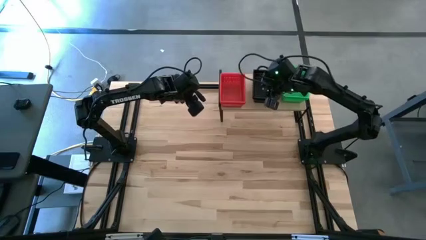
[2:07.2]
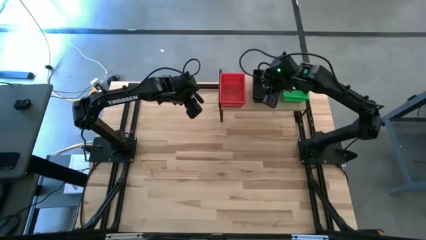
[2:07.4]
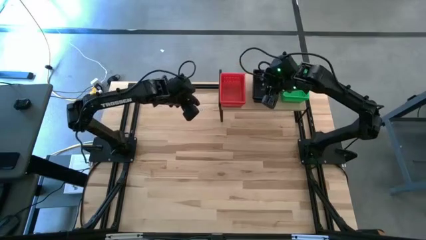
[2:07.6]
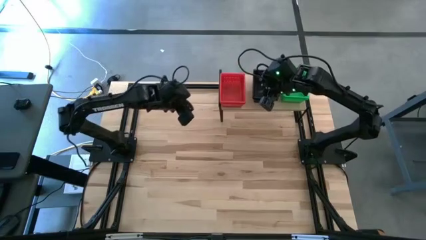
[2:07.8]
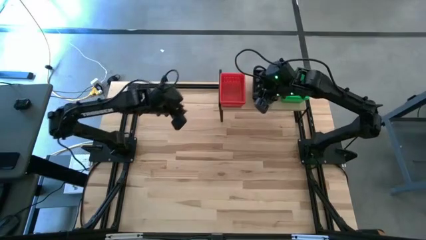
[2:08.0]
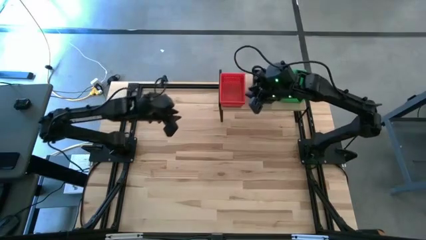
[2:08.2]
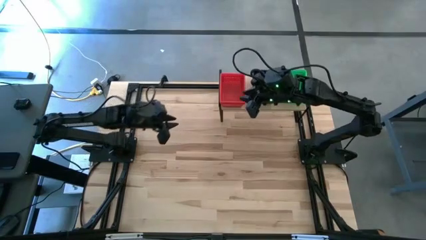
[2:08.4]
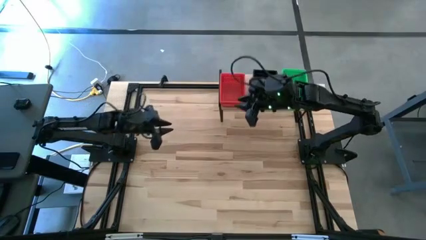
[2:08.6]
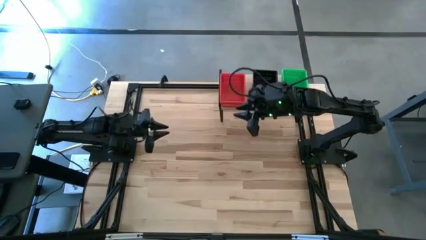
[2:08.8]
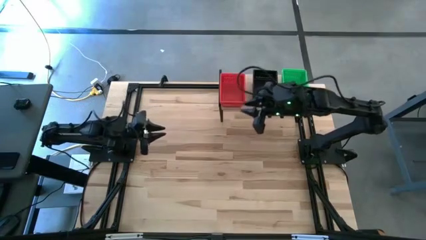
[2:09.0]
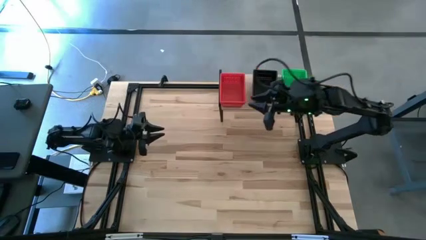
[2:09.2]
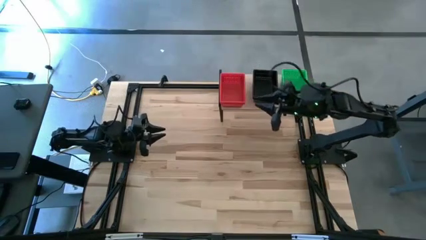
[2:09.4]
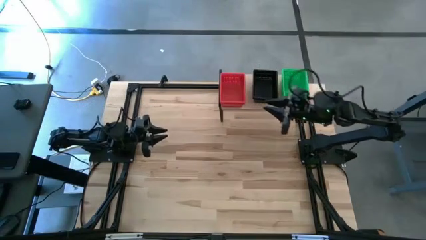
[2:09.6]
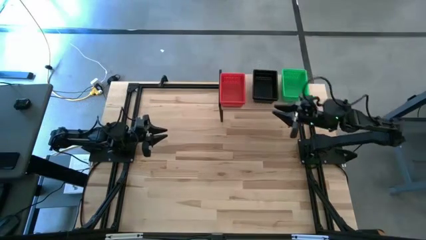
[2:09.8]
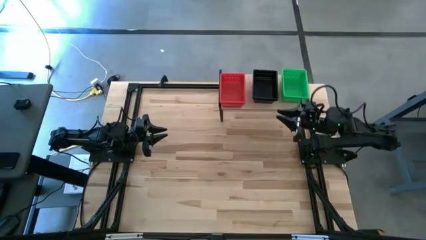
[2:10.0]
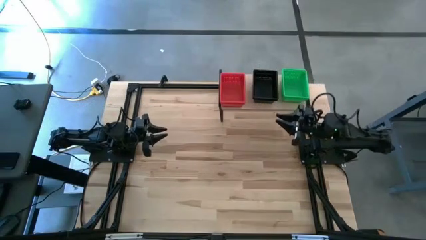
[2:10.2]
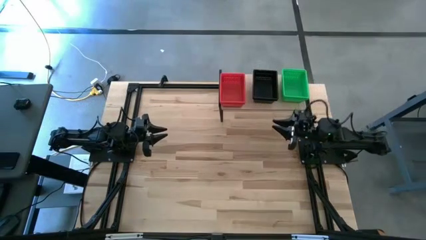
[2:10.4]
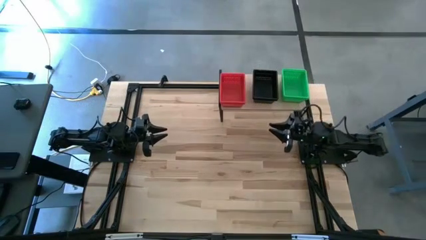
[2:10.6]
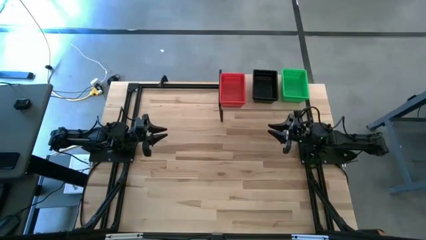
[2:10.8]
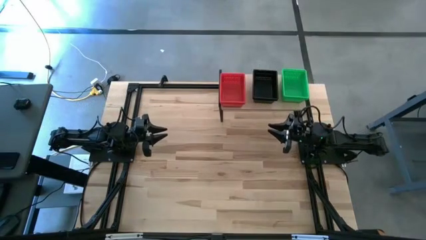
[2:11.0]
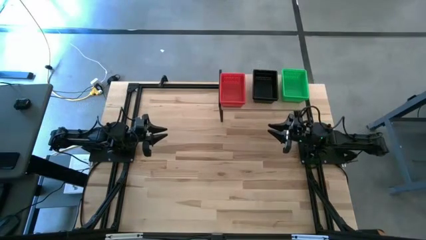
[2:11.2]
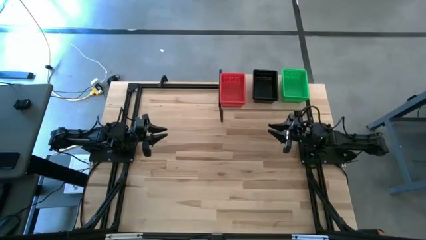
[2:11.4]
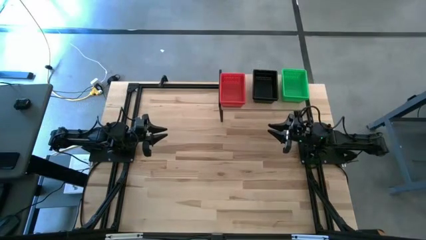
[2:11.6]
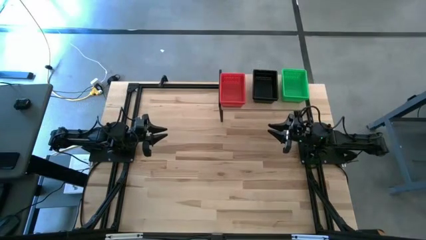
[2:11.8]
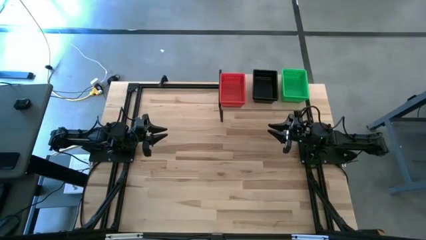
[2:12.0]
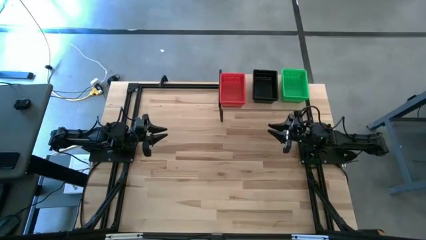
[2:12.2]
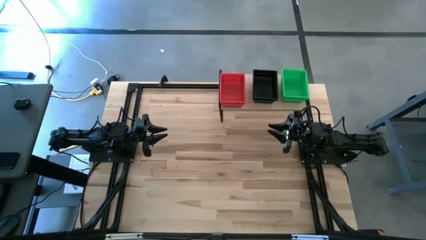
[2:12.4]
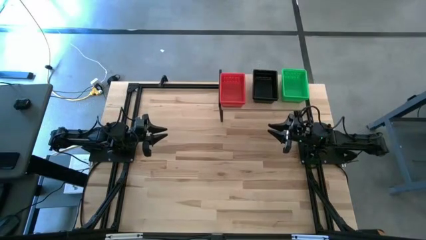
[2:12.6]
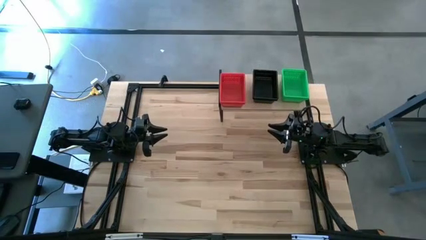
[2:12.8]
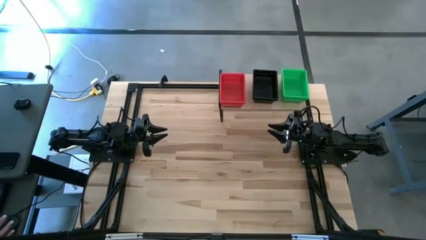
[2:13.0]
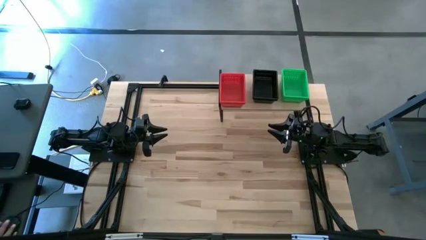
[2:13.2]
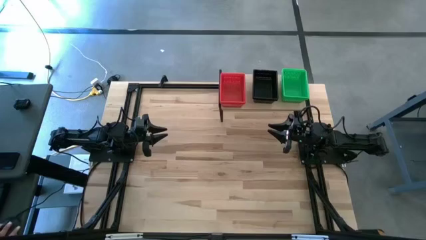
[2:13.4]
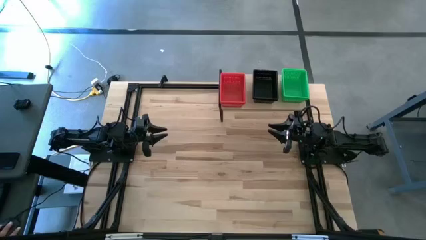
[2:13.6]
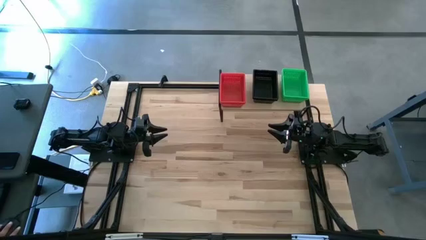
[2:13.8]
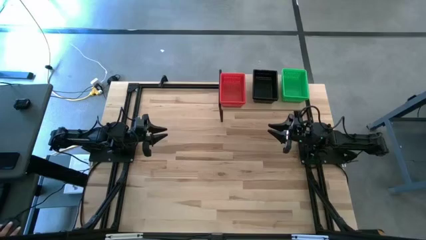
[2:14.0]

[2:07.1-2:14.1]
Task: Stack baskets on shelf by color
Return to Home Position

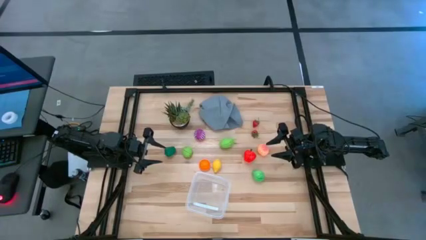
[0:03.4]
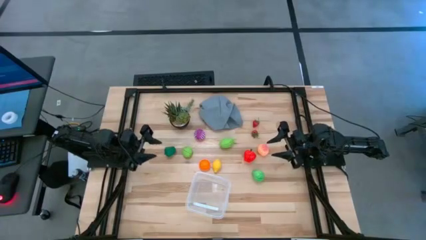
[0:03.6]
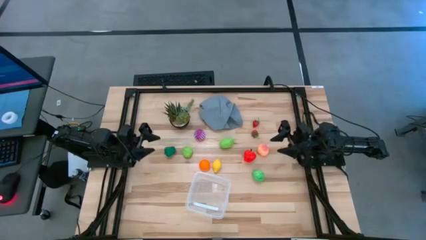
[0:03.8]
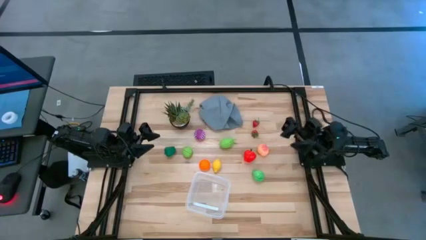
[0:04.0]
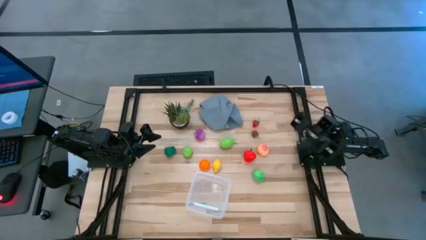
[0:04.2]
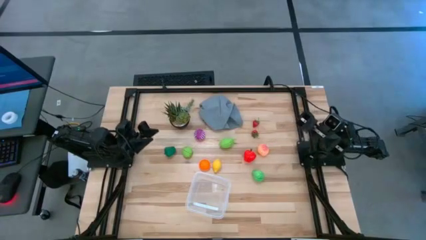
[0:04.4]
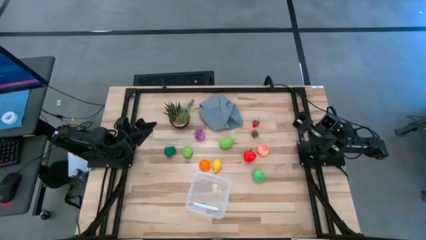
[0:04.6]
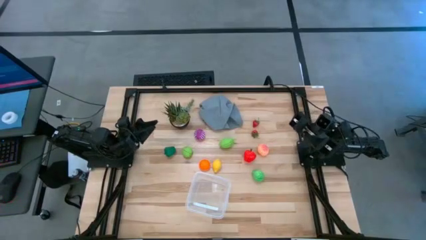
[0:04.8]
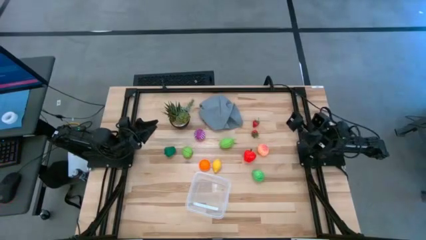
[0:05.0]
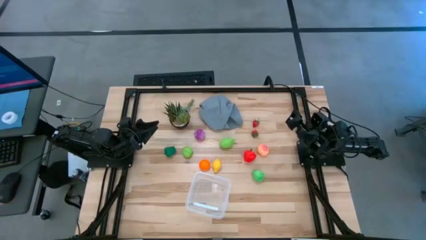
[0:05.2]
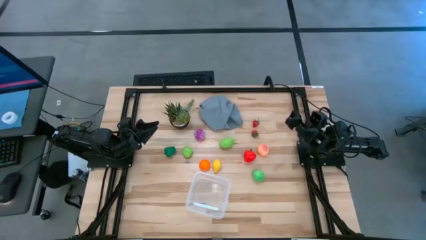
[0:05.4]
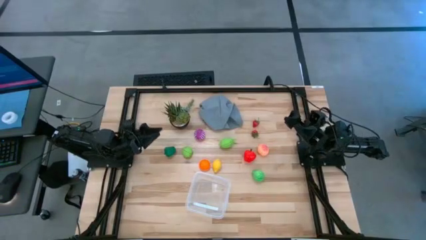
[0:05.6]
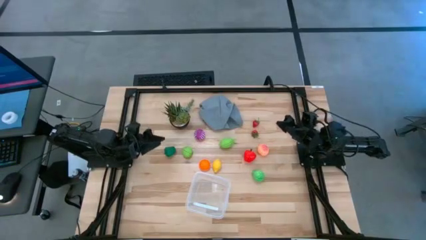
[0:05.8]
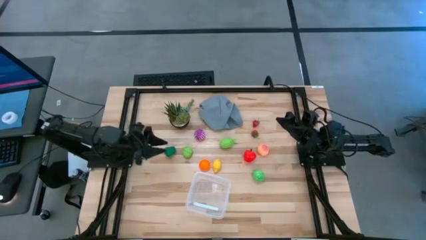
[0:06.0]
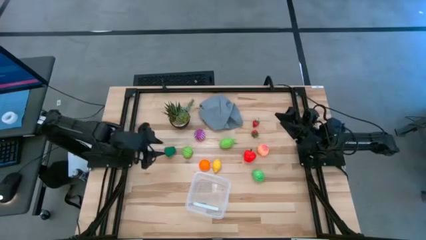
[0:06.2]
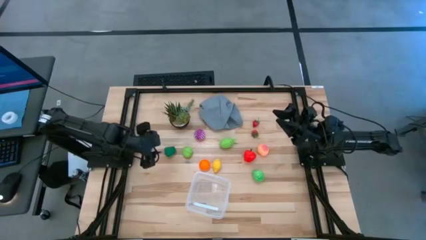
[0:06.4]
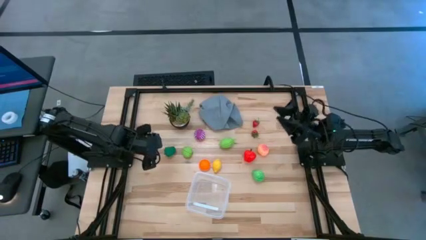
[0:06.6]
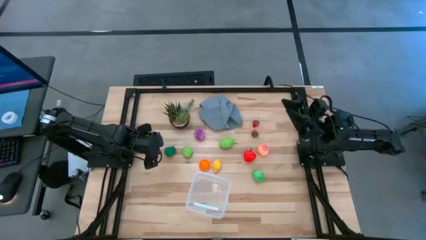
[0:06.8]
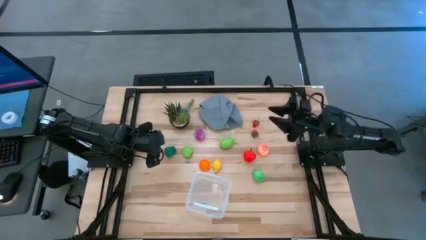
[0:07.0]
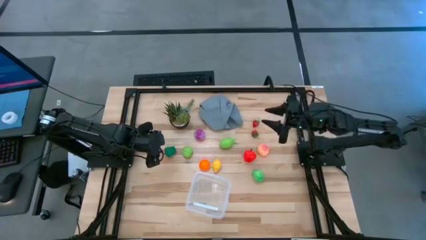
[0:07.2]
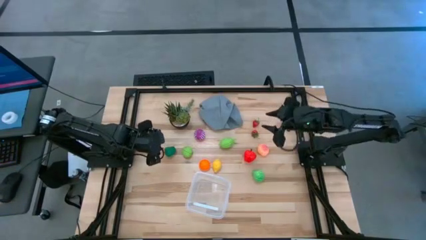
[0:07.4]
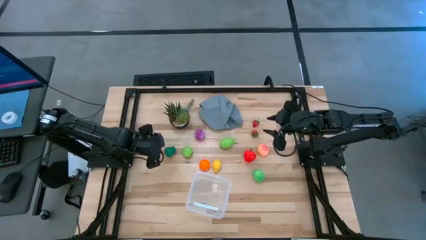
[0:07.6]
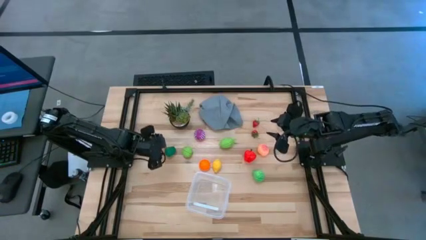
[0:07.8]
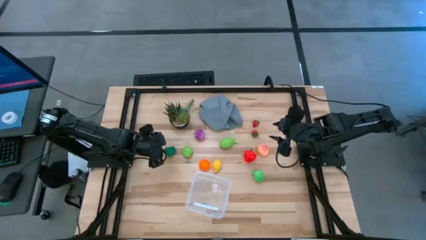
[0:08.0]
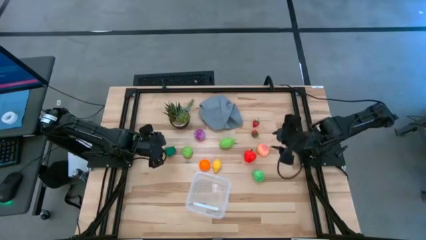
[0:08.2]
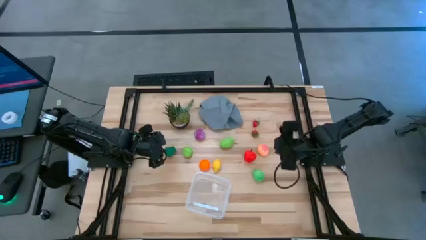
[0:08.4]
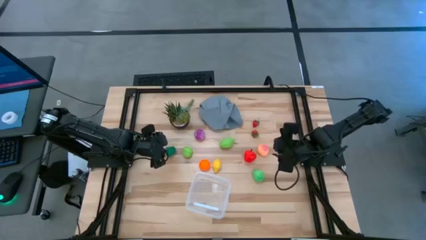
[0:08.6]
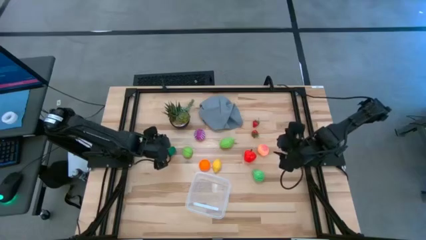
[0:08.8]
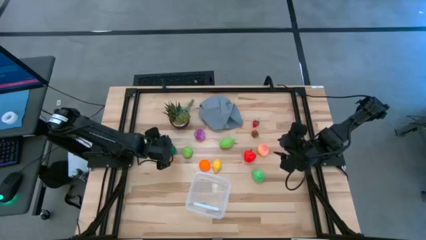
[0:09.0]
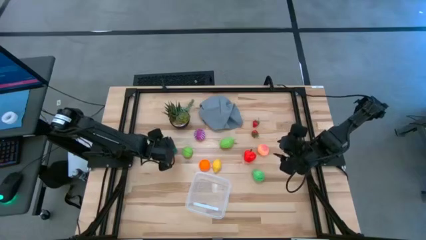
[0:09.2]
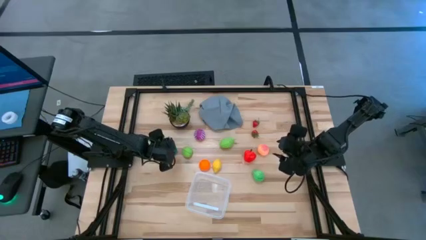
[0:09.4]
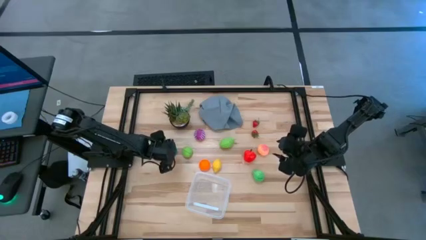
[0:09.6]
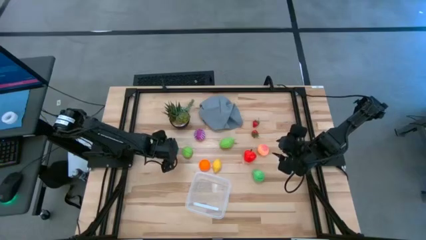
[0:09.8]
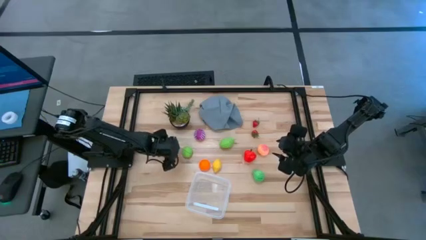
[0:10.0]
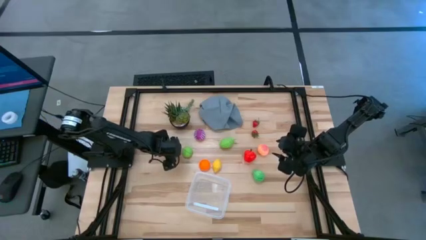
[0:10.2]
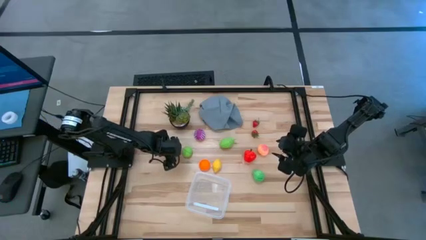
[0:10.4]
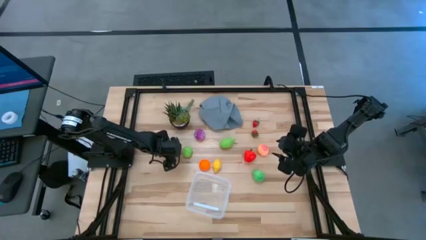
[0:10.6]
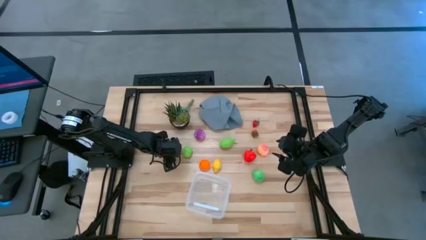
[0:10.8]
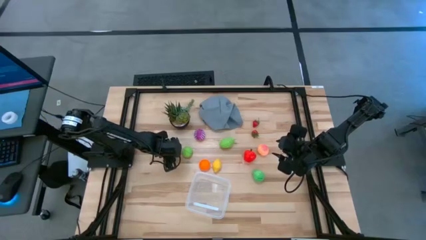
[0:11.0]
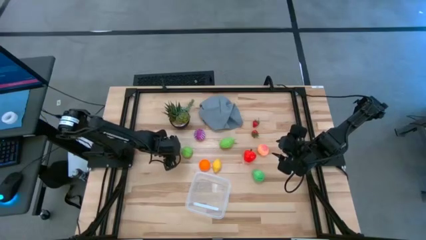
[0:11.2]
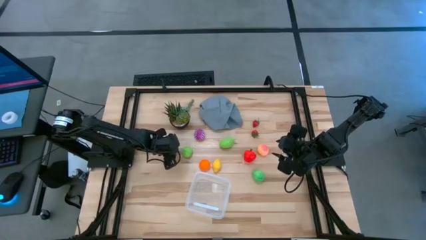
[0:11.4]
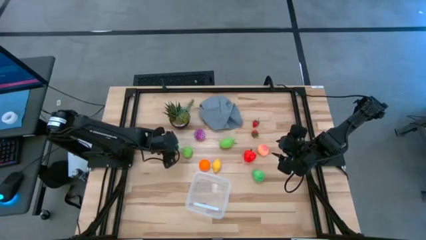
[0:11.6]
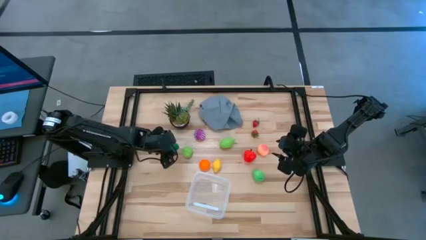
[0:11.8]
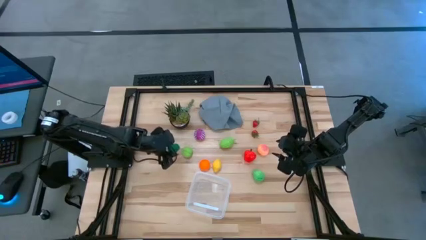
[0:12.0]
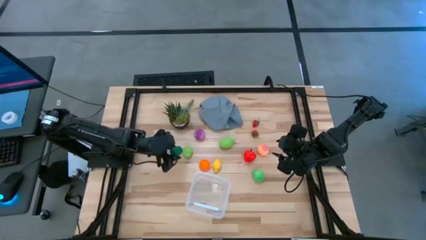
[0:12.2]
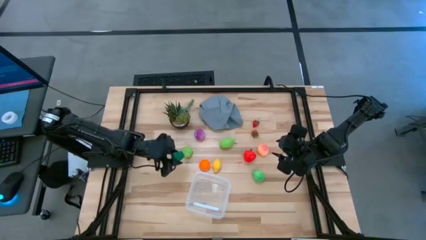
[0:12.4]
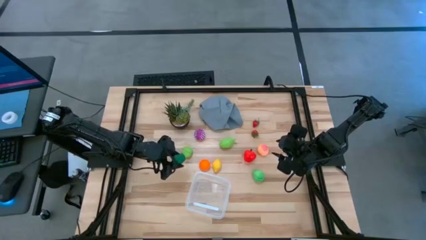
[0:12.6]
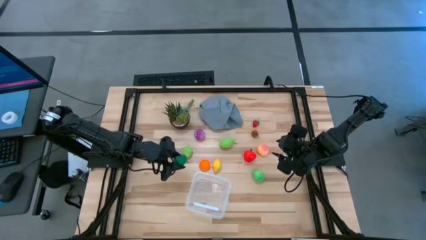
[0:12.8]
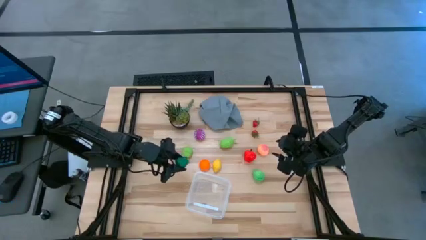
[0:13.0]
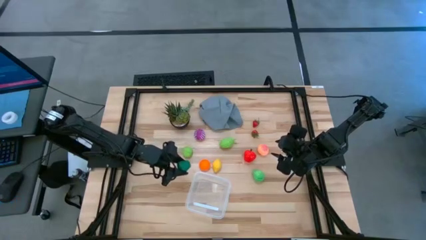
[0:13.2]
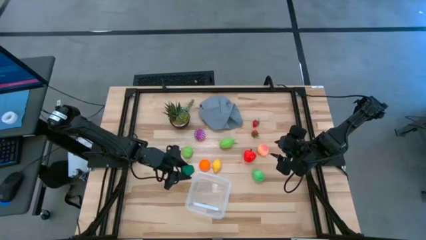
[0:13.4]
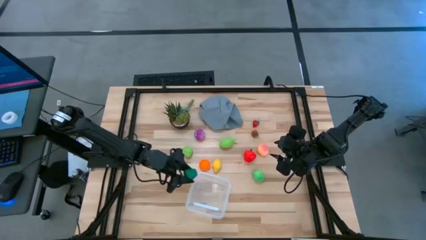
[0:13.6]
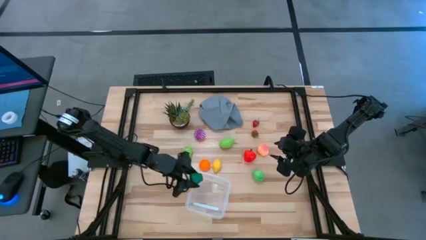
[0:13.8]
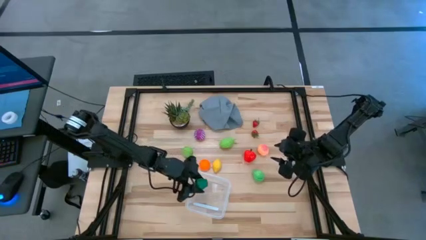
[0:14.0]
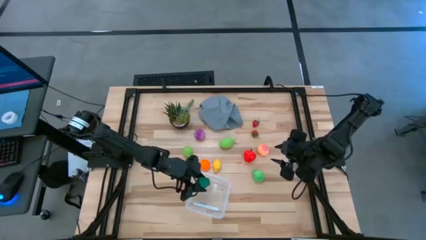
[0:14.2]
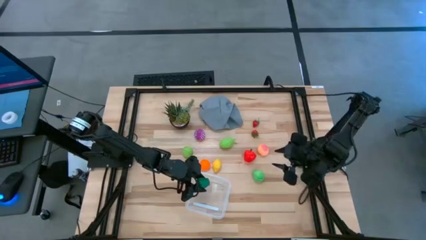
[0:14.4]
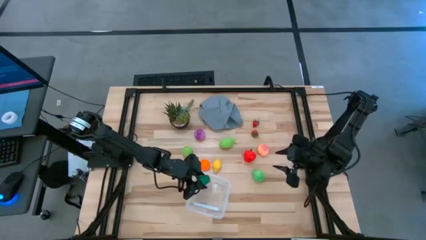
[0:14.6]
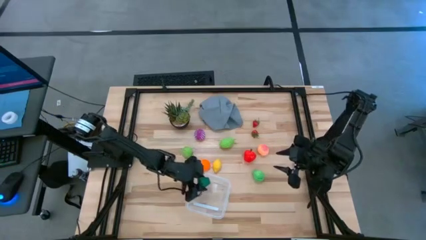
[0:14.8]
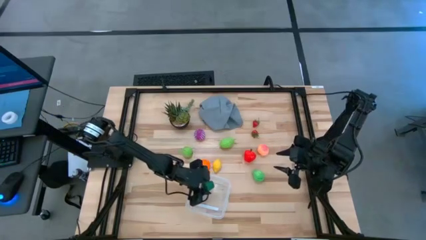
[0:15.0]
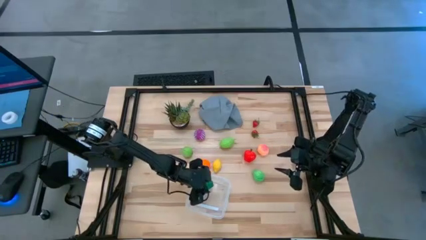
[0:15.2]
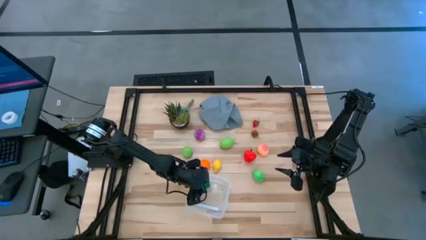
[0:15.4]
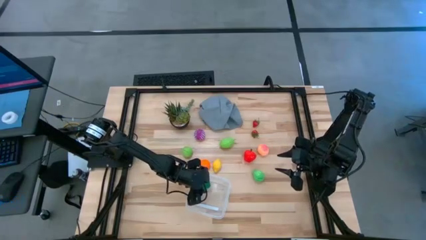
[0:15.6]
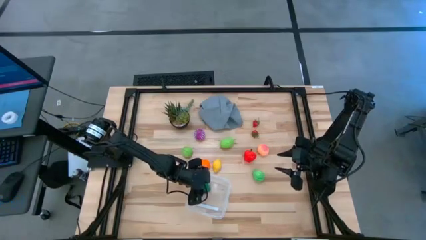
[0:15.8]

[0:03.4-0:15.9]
Task: Pick and placing Produce into tupperware
Put the bell pepper into the transparent bin
